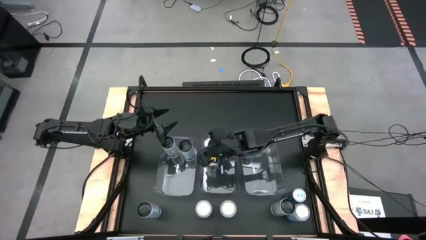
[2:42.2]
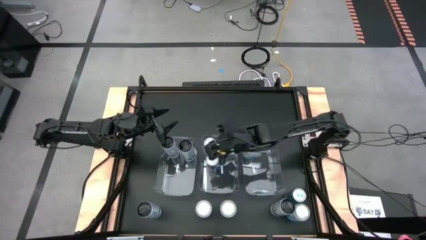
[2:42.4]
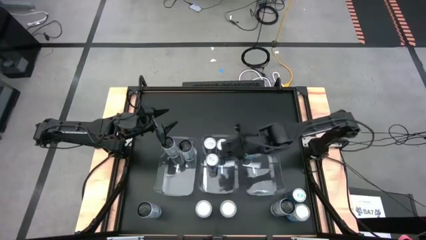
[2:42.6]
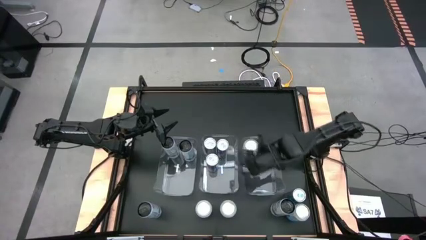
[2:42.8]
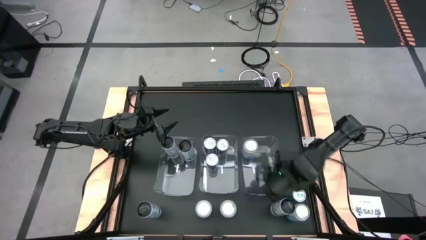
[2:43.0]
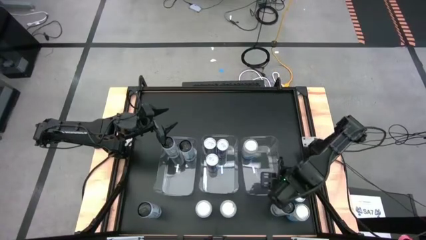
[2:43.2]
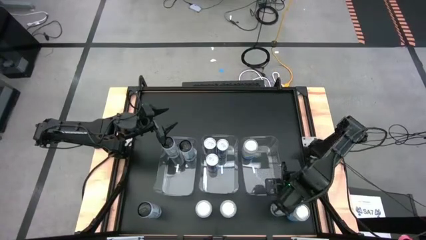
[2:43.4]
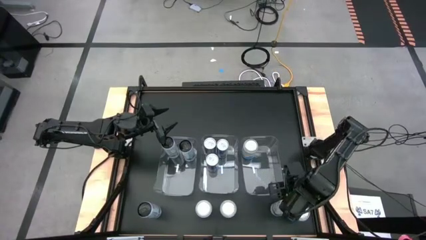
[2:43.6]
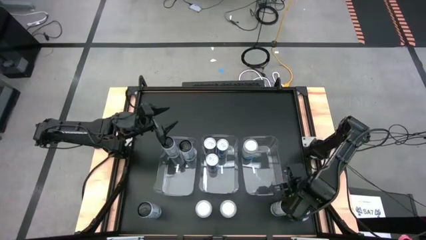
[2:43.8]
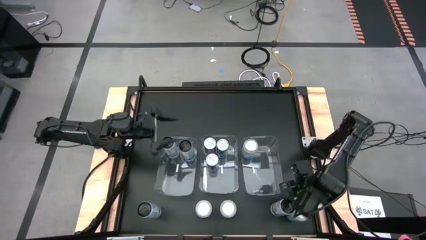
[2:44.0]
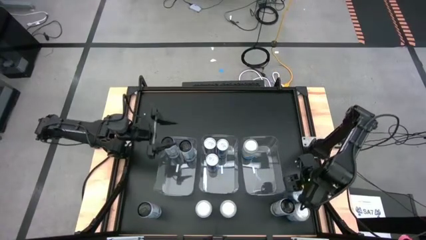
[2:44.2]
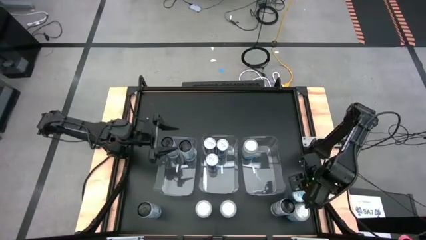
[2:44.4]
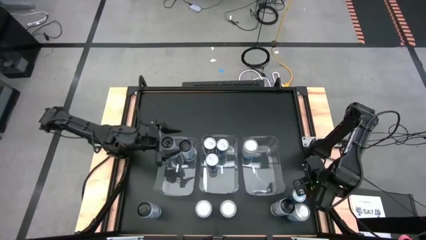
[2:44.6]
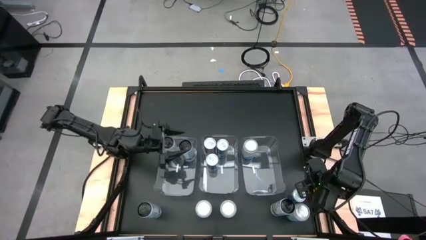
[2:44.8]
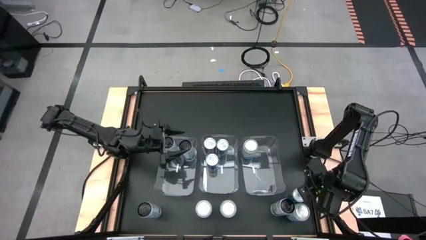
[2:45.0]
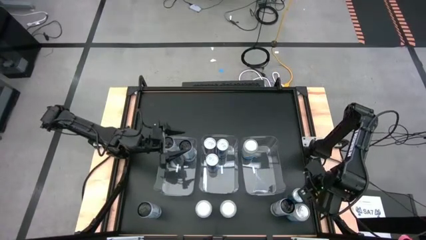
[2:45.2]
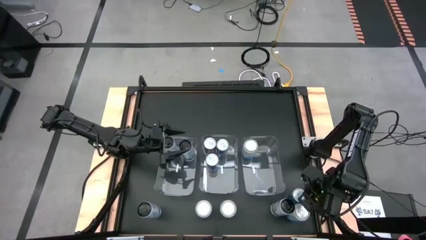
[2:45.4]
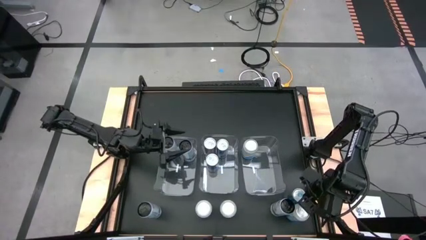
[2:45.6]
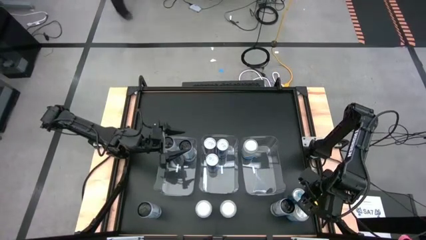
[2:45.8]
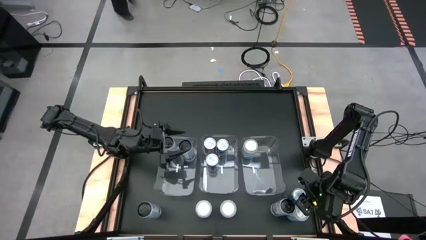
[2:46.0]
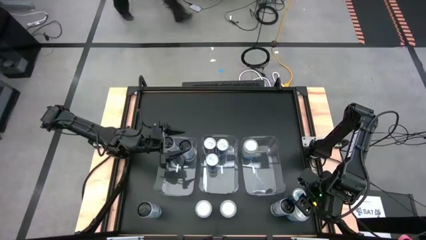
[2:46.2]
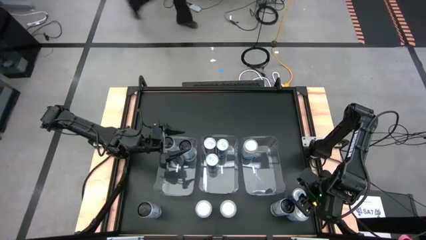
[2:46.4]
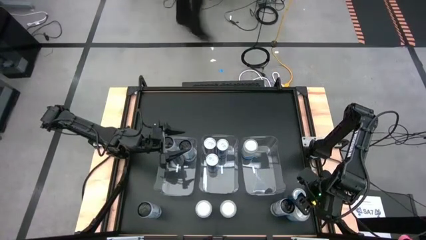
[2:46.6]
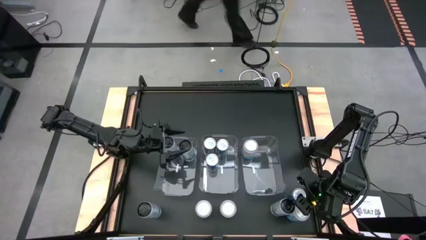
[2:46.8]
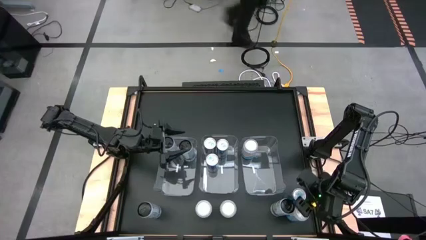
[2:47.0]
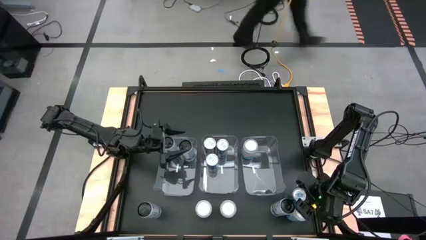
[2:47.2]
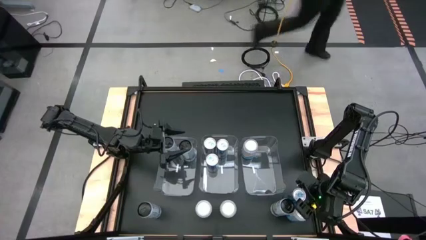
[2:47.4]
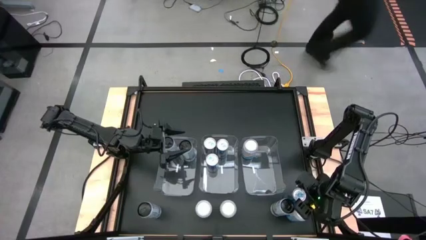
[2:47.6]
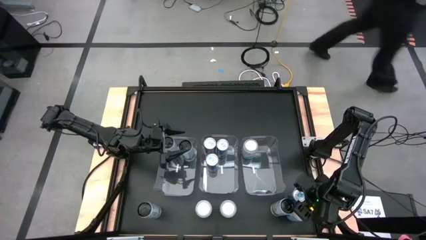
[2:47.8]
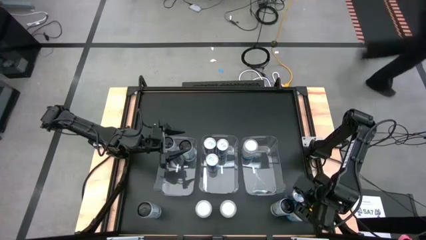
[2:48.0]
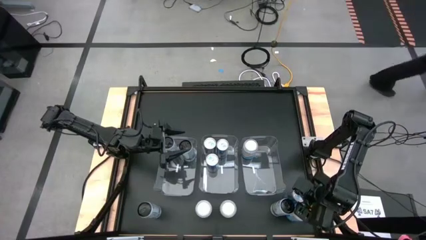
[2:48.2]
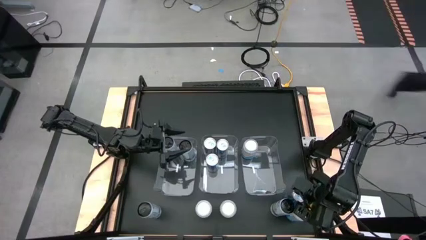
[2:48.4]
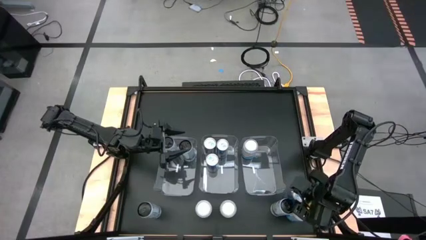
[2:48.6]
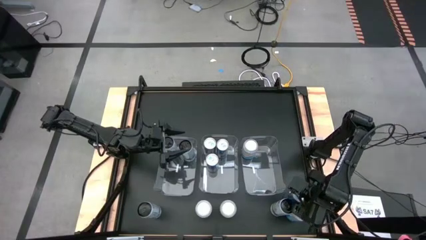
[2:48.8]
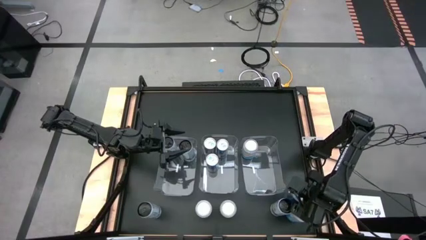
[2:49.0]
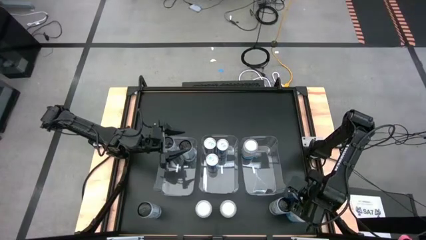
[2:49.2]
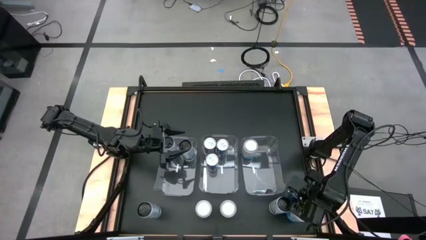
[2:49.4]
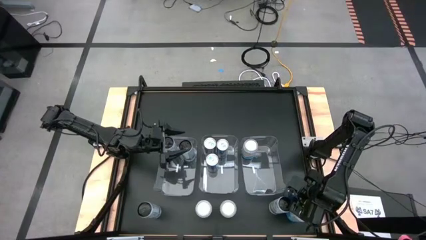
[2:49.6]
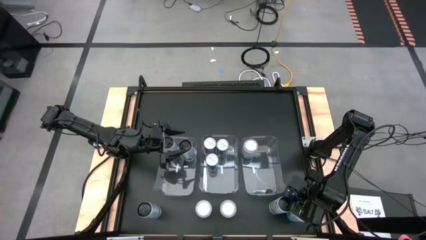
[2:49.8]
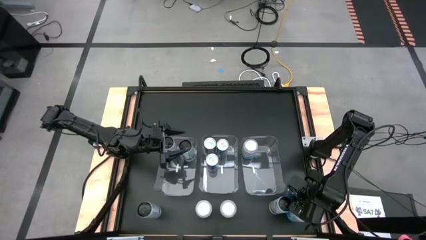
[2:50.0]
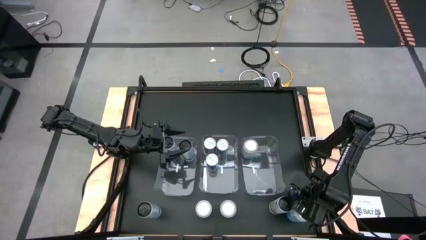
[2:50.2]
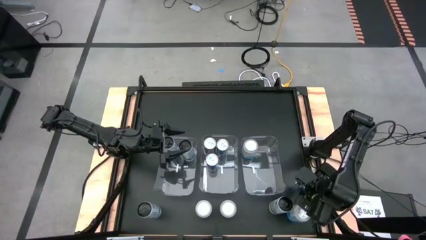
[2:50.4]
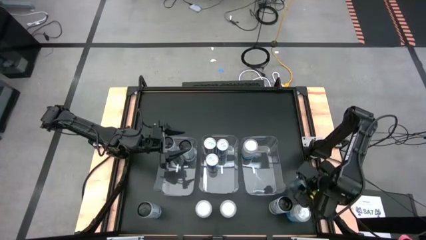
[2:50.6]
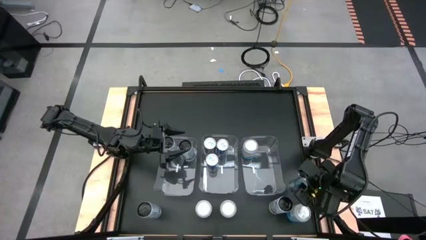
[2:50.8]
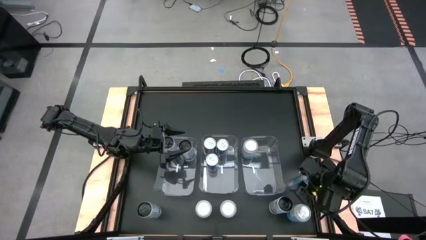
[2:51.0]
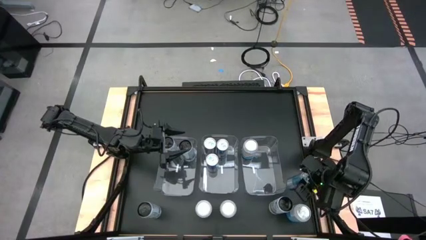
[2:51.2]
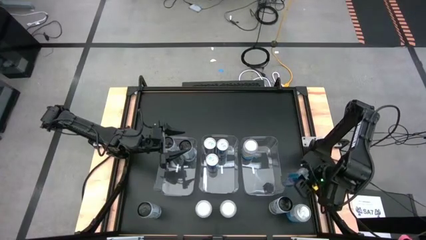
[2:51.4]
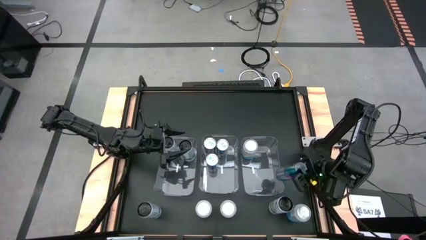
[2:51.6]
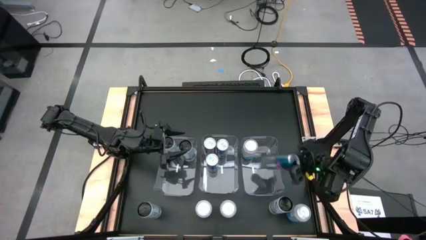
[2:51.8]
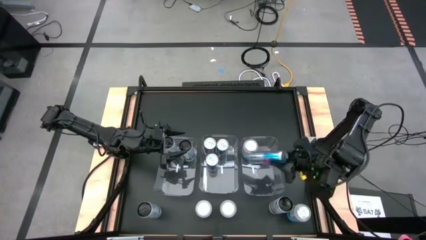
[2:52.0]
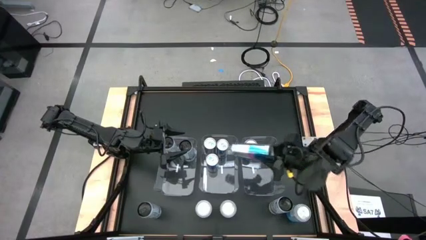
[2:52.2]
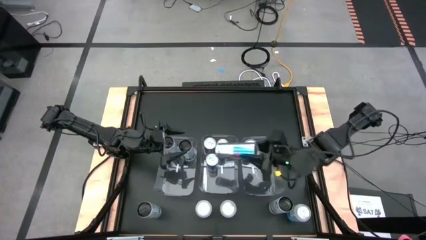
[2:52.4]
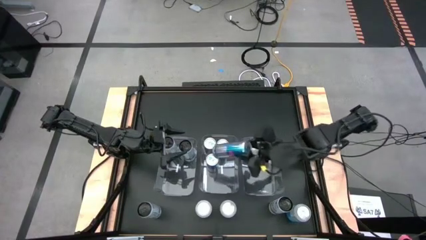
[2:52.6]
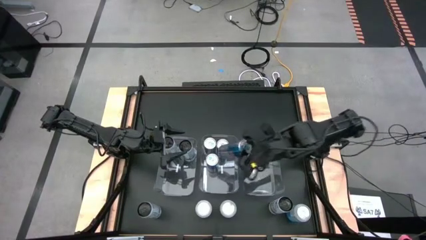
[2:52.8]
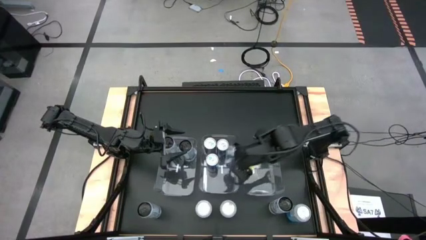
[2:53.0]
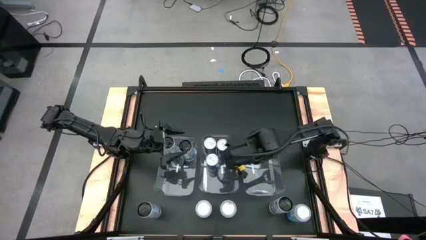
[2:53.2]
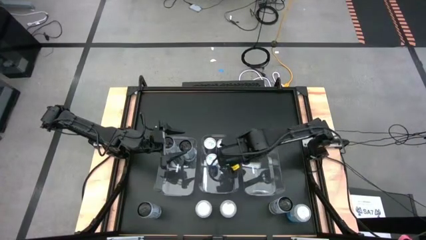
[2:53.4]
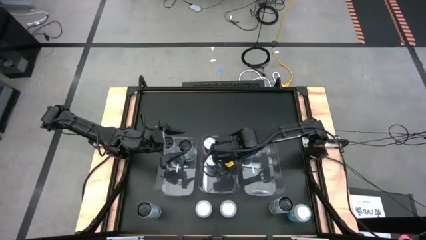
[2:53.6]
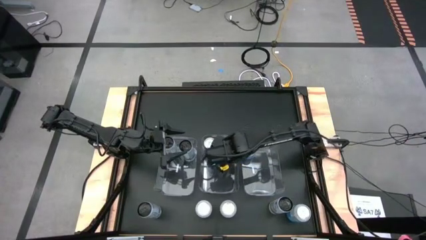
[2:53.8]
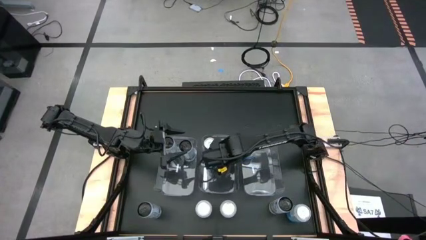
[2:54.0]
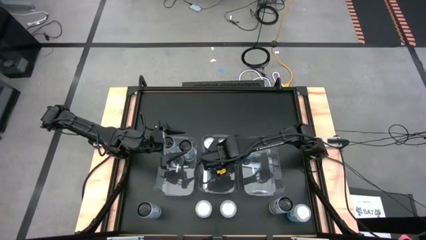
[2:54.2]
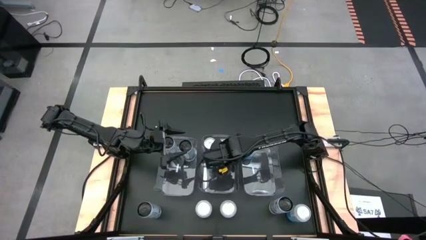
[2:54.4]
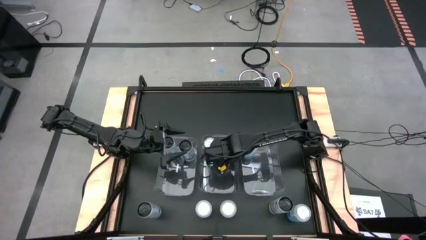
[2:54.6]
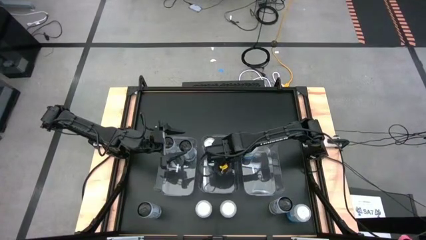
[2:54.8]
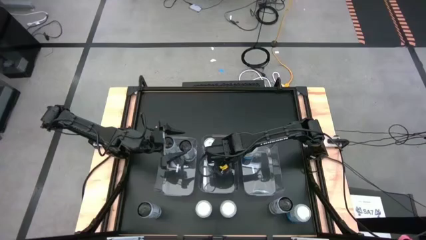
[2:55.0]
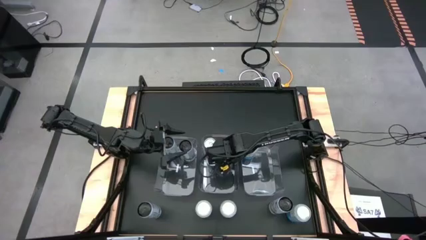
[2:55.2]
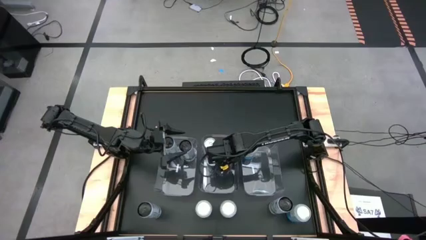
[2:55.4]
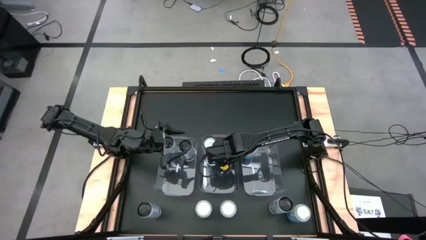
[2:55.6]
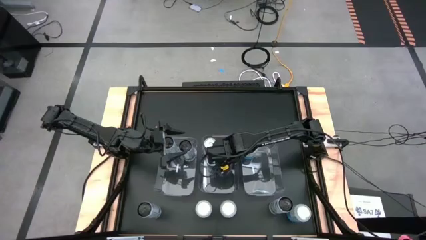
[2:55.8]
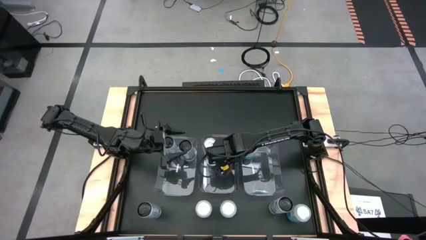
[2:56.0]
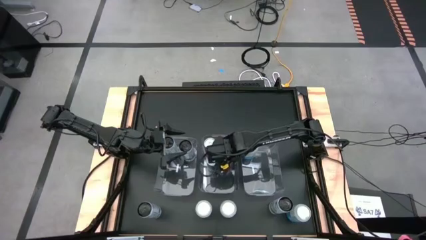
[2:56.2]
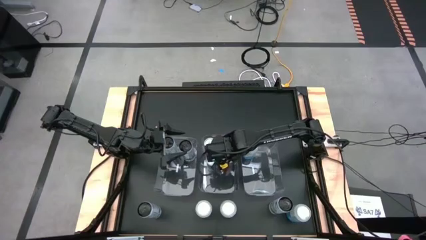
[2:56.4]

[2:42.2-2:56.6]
Task: Sort soda cans
Put the blue soda can into the middle transparent bin

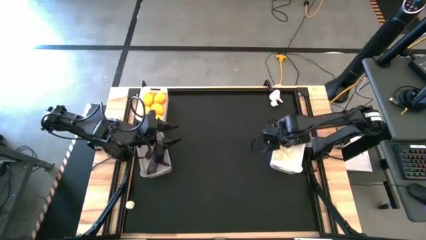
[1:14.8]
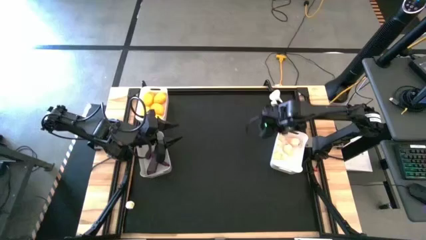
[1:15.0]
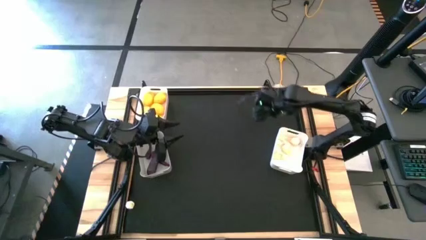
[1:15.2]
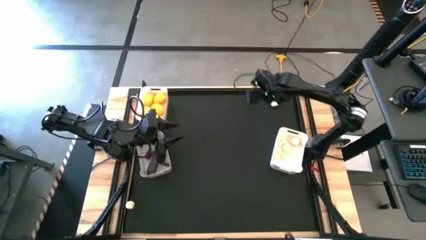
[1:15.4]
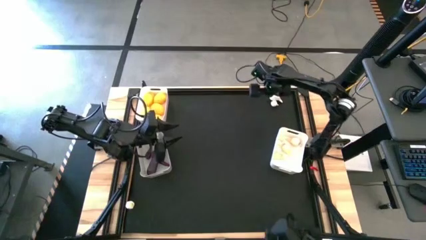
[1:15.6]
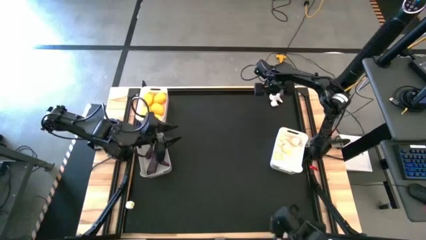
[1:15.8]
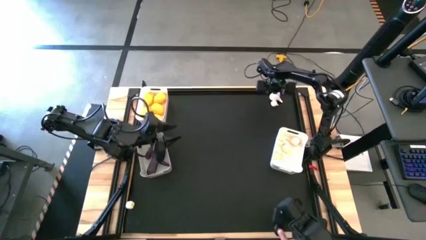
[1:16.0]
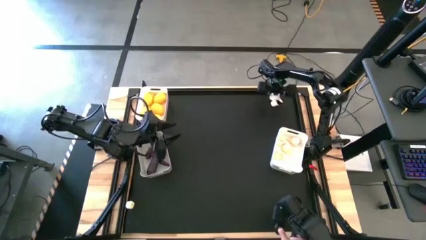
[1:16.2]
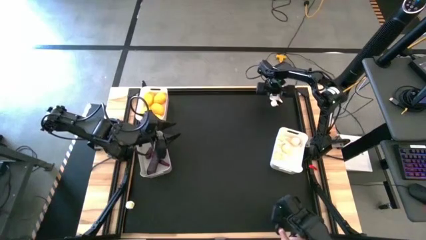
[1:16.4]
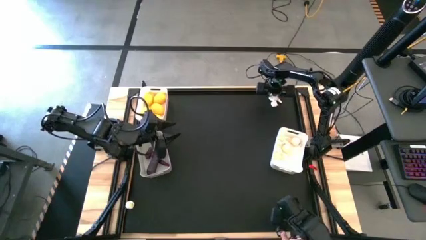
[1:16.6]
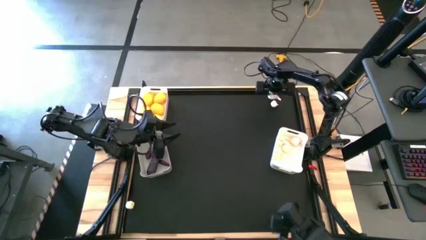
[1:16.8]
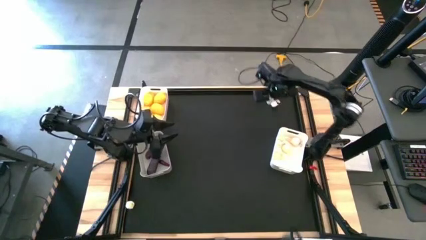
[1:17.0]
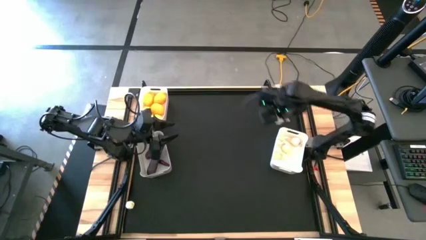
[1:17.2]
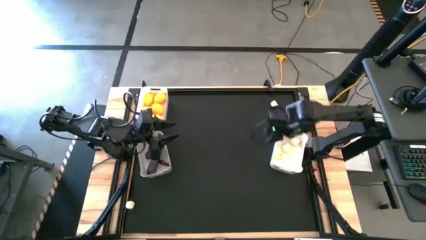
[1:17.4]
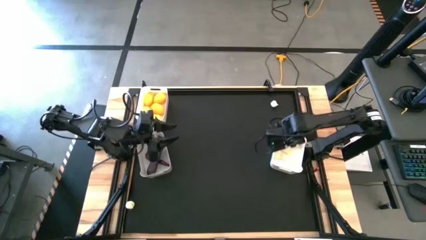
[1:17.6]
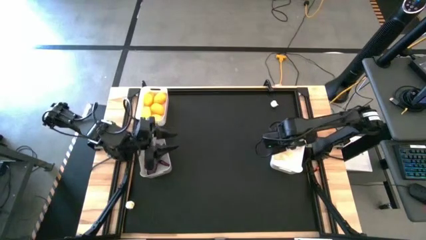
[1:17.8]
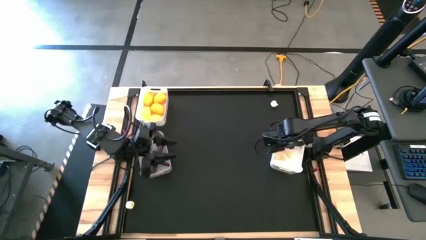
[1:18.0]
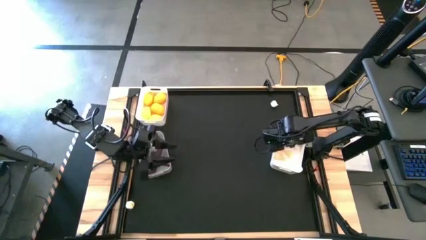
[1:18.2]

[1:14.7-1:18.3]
Task: Sort produce into baskets
Put the white garlic into the bottom white bin
